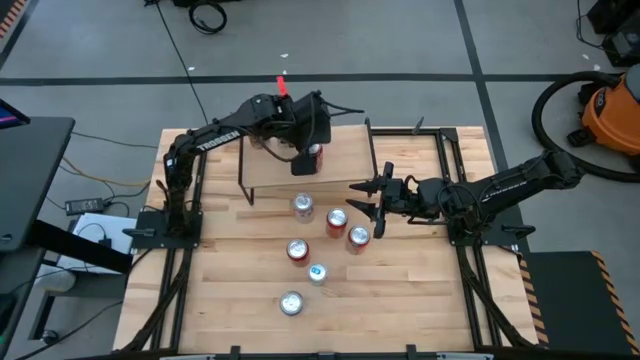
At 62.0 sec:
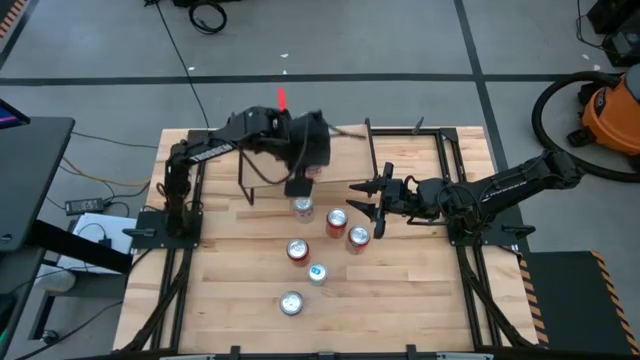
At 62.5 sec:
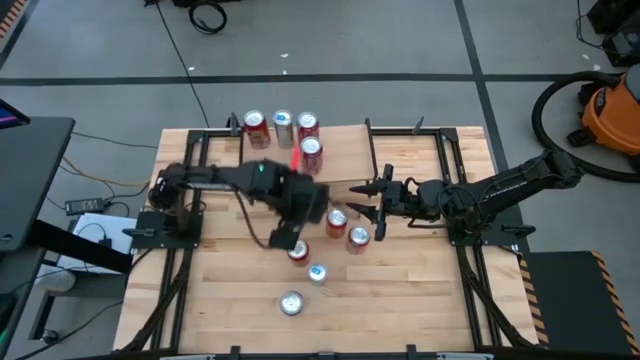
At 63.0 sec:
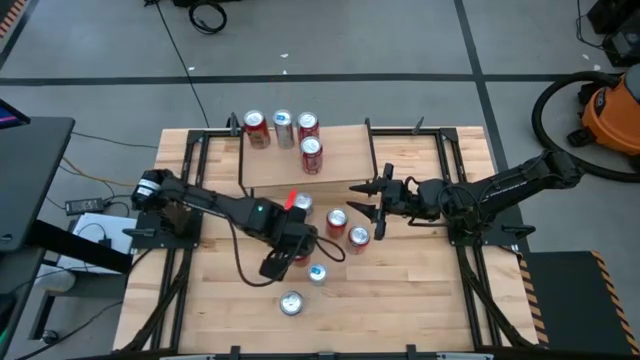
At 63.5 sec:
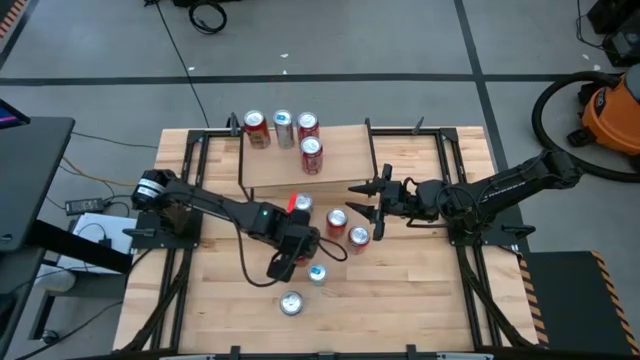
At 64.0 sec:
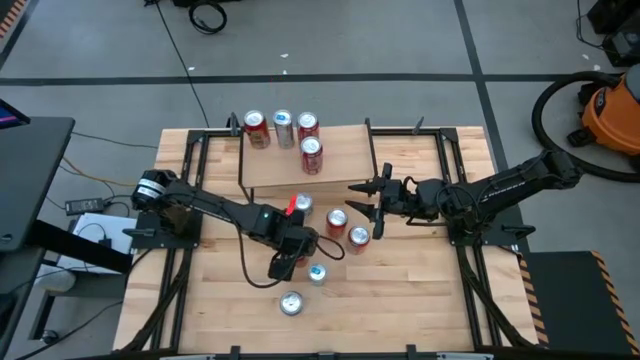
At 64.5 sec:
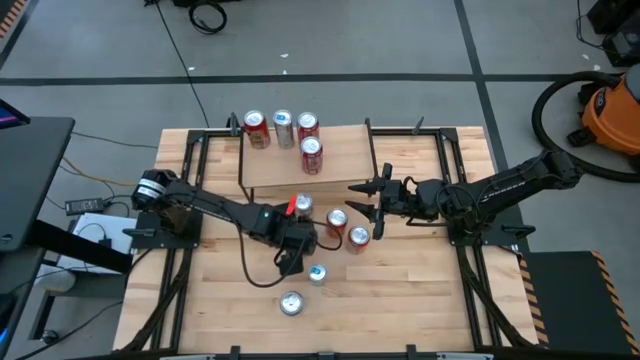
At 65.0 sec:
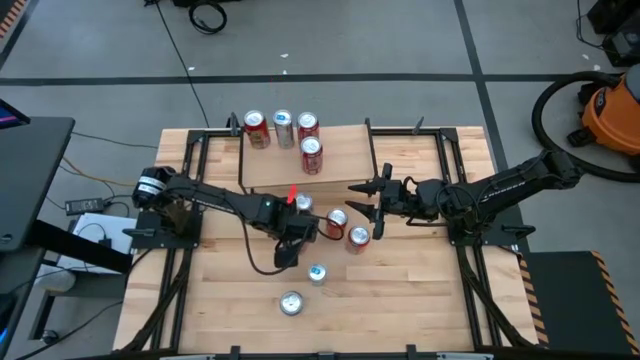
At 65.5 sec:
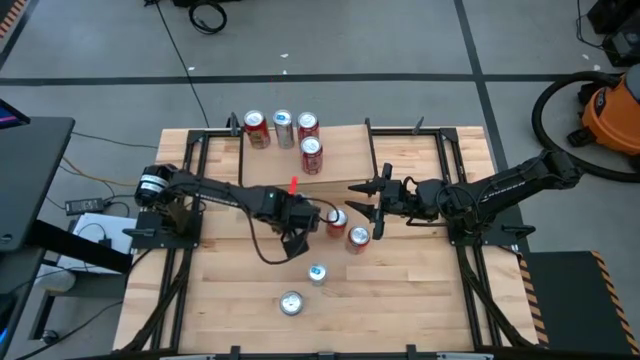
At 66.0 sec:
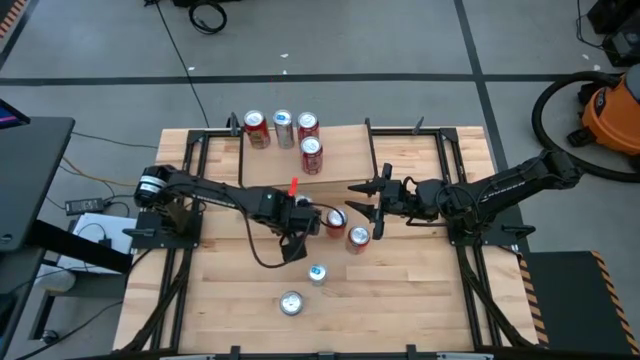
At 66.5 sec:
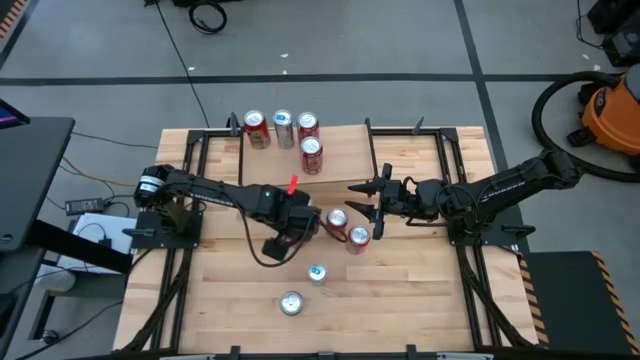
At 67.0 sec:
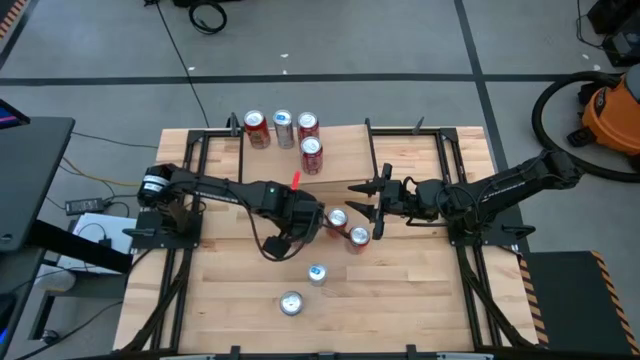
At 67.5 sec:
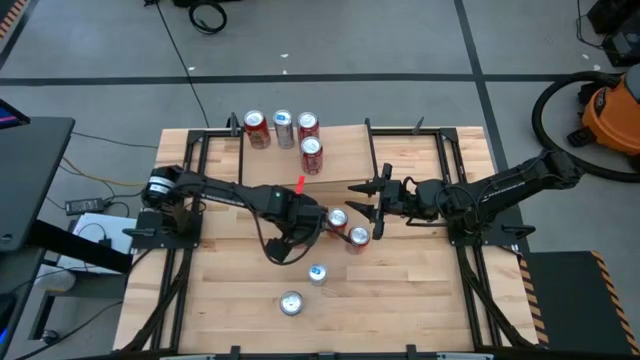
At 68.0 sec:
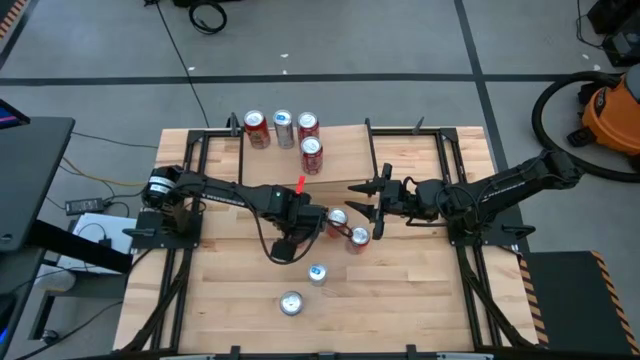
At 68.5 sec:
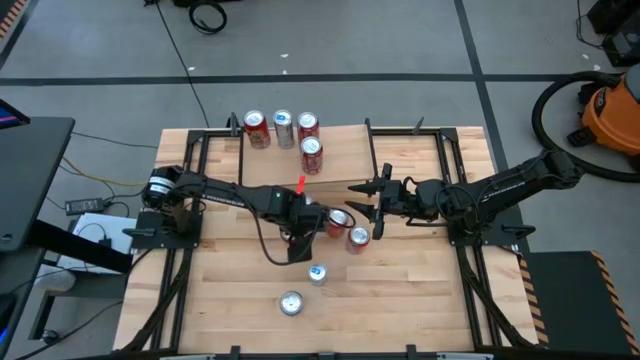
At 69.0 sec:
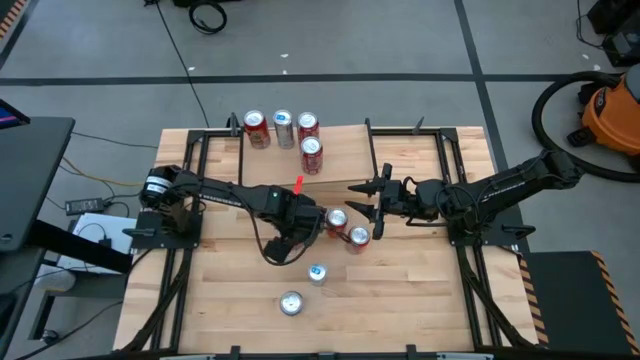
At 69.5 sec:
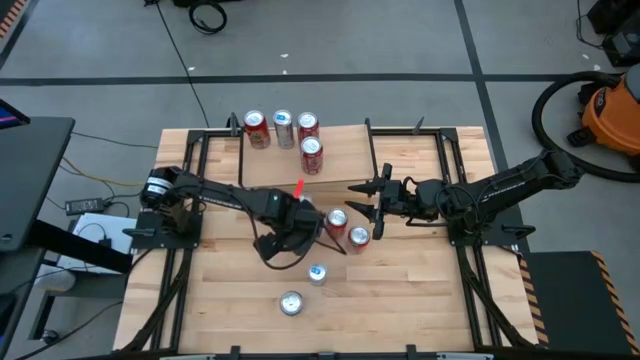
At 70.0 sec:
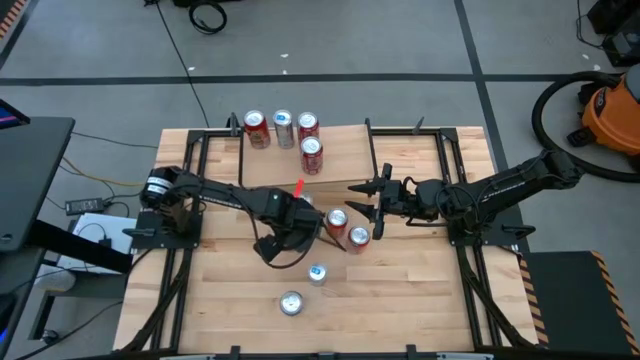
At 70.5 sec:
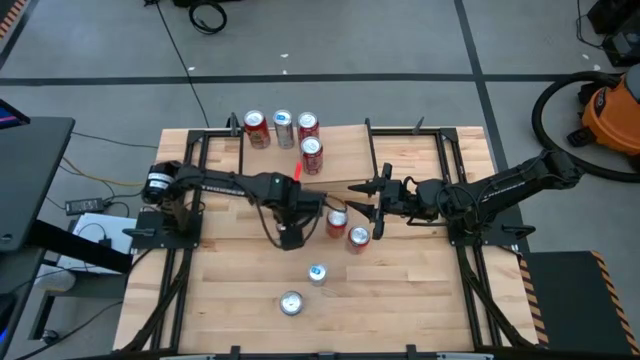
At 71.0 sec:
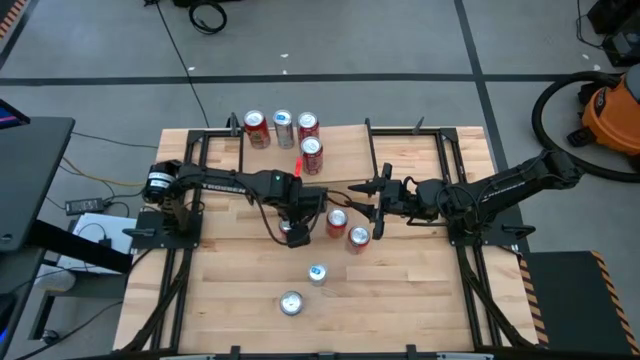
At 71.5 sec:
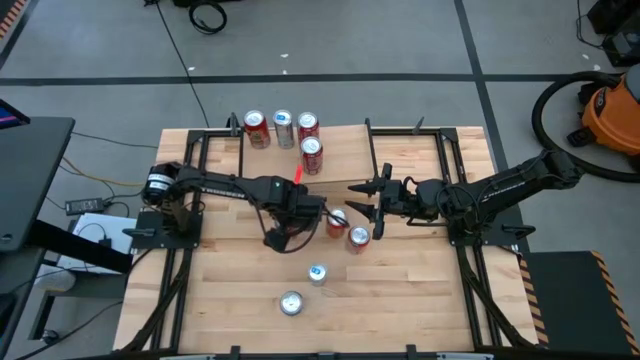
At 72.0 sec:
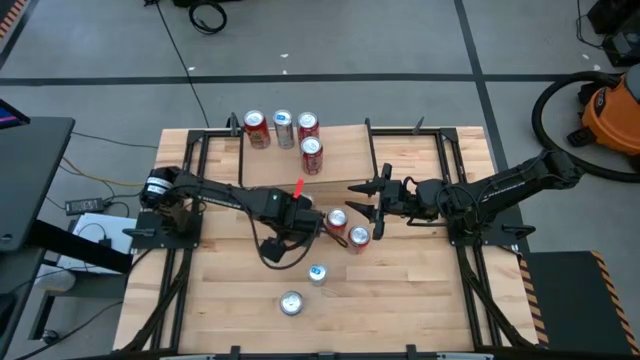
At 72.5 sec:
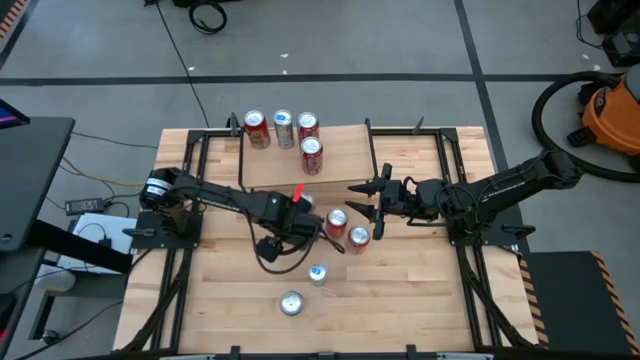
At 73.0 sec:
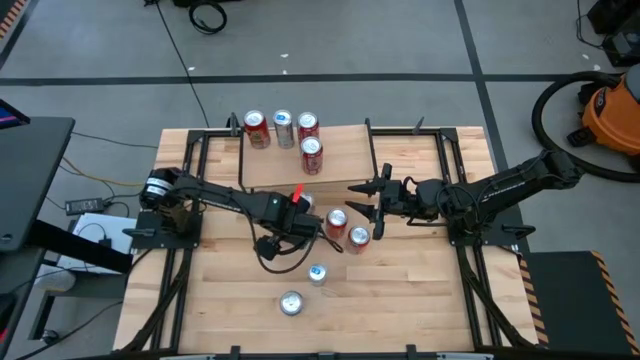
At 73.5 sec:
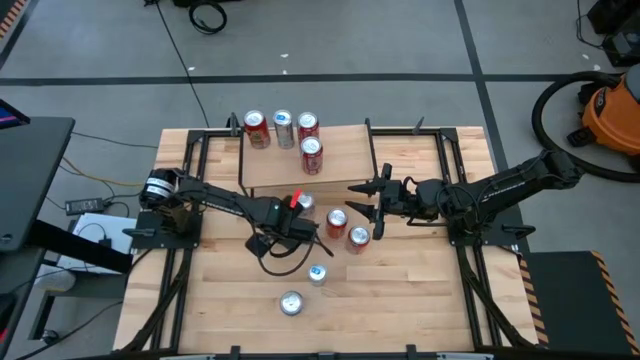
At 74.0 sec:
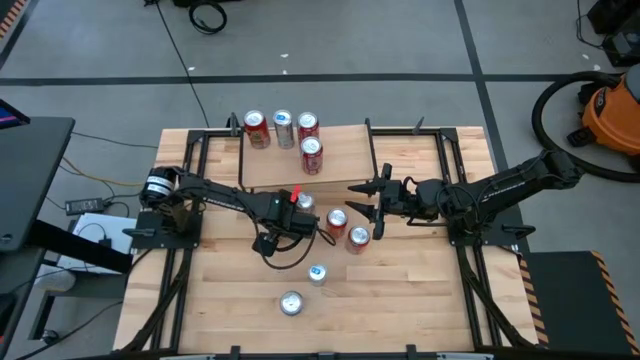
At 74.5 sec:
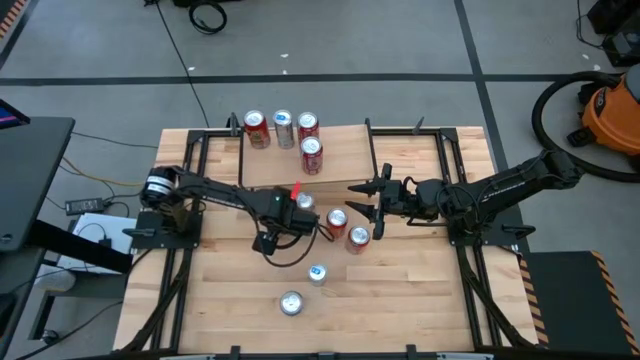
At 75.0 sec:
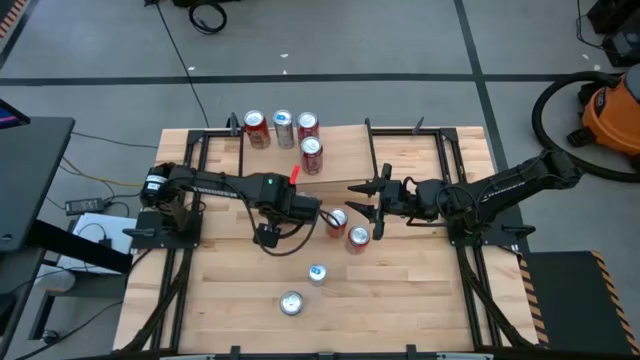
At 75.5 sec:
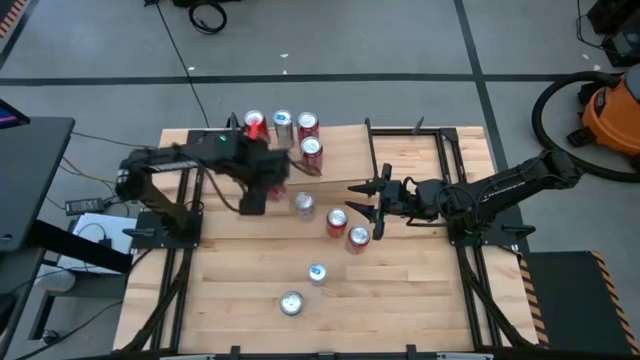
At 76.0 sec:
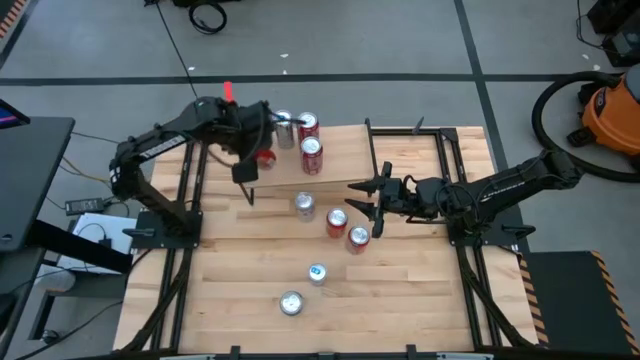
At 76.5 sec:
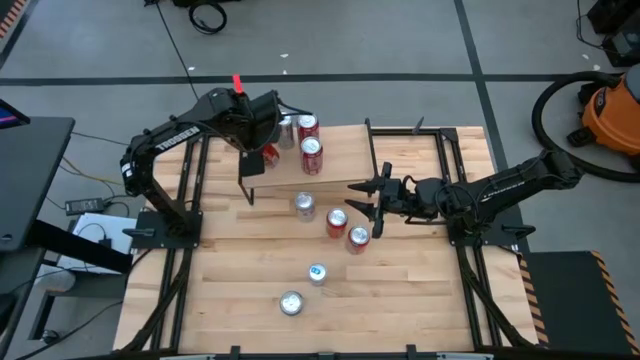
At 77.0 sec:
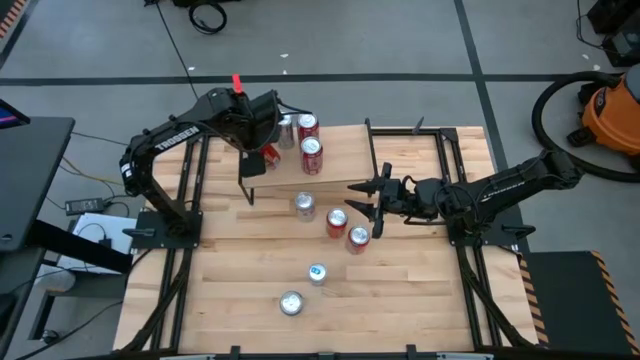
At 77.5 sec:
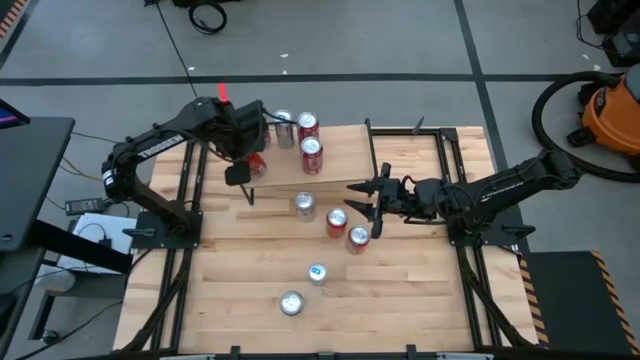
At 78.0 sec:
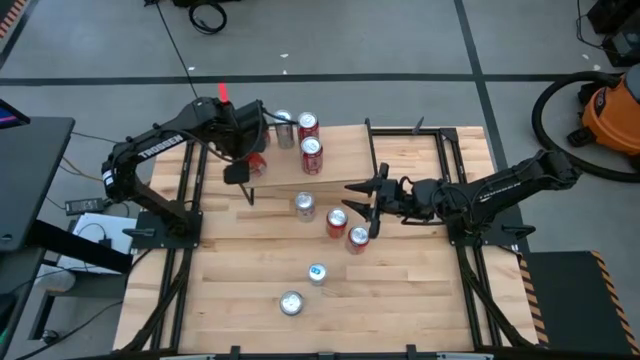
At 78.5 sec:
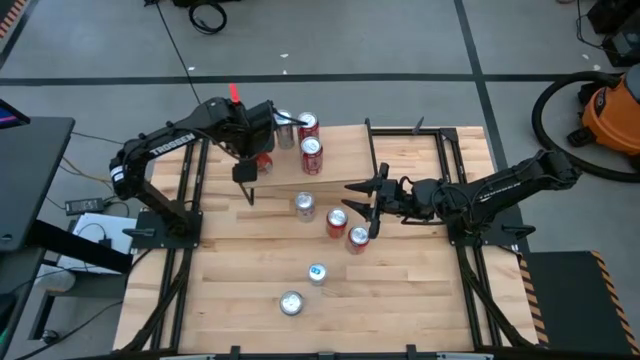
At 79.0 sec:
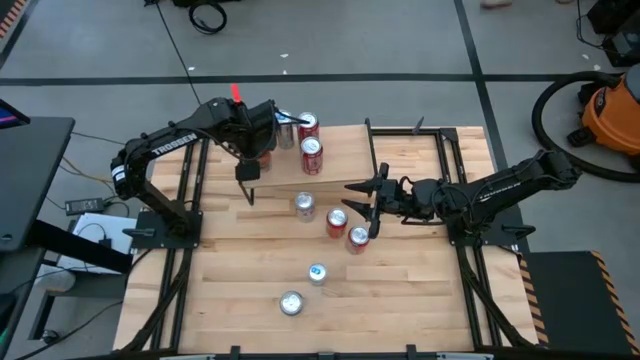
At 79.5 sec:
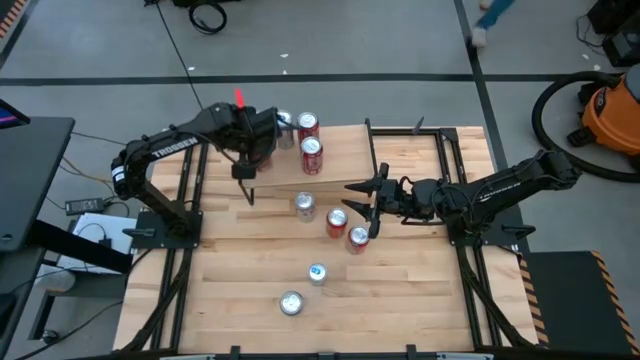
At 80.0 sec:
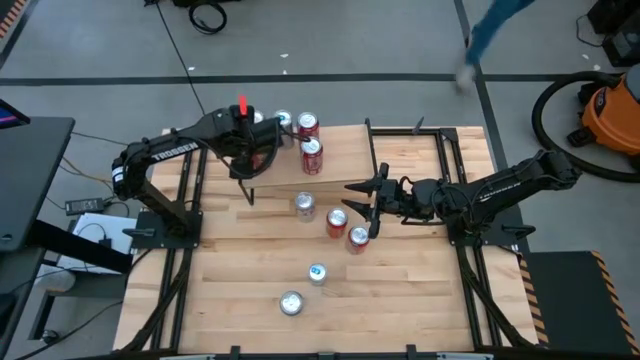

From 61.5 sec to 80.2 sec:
Task: Place canned beverage on shelf
Put the red black soda can on the shelf
